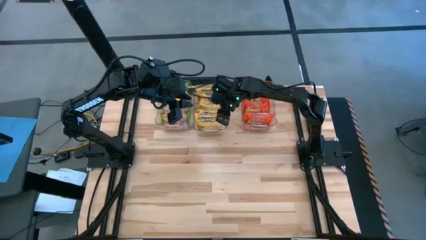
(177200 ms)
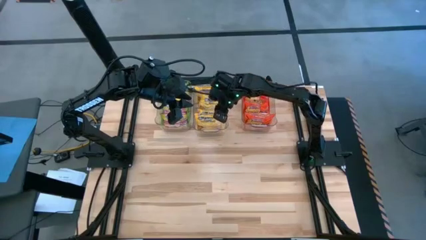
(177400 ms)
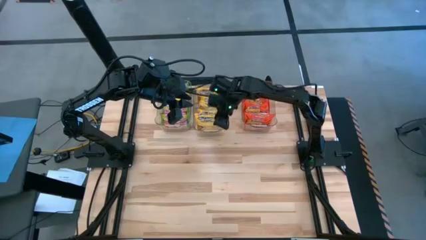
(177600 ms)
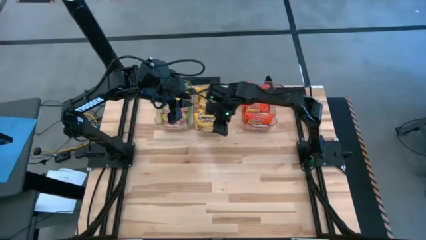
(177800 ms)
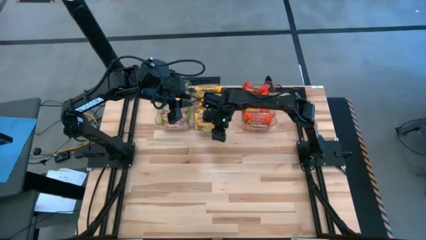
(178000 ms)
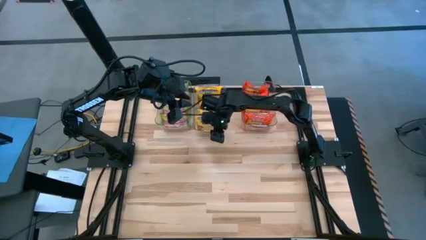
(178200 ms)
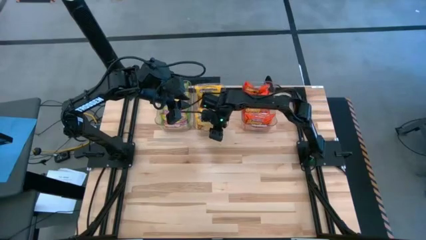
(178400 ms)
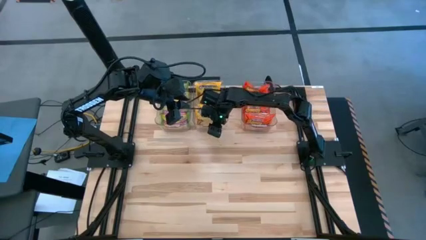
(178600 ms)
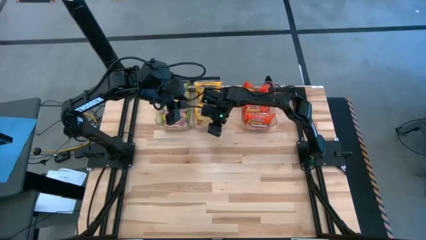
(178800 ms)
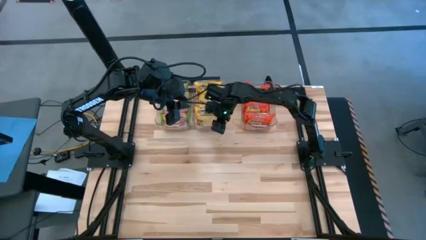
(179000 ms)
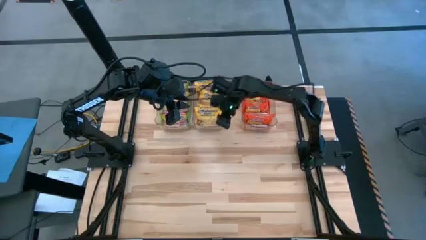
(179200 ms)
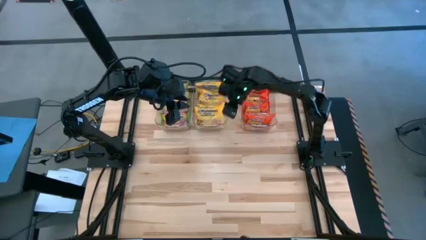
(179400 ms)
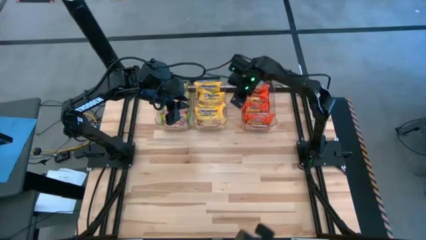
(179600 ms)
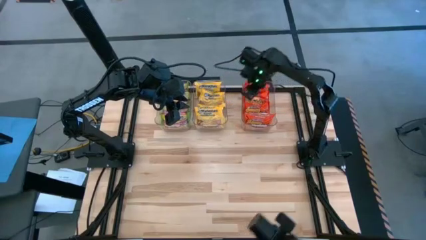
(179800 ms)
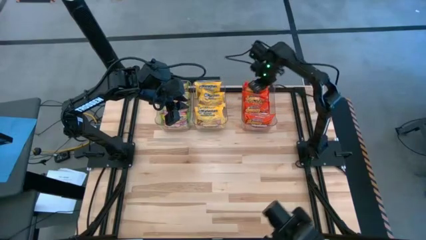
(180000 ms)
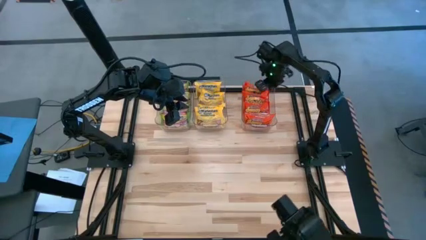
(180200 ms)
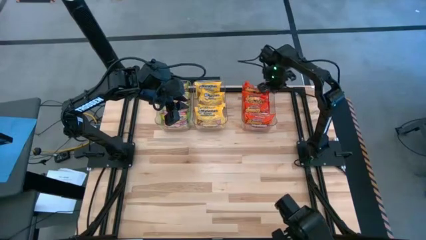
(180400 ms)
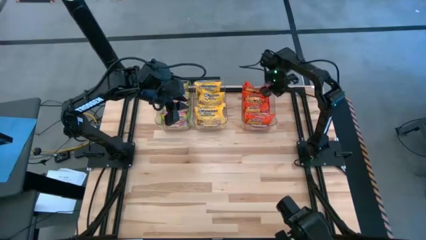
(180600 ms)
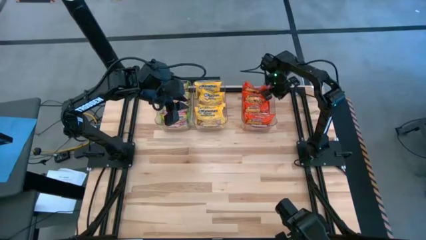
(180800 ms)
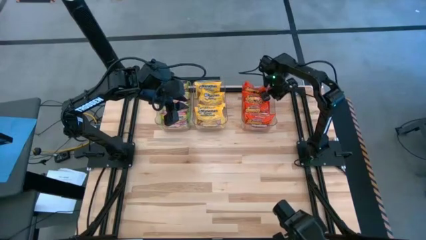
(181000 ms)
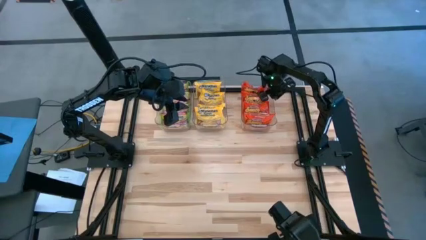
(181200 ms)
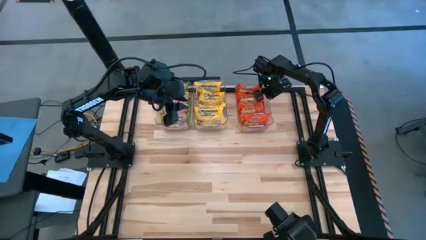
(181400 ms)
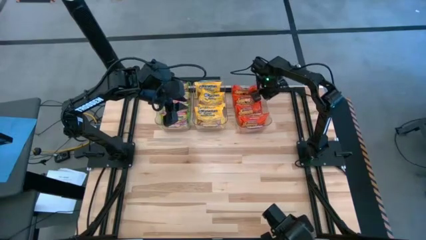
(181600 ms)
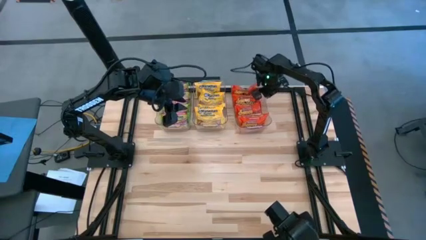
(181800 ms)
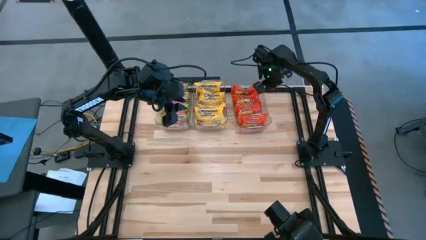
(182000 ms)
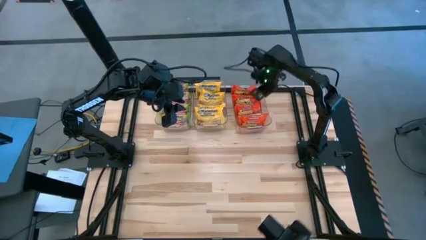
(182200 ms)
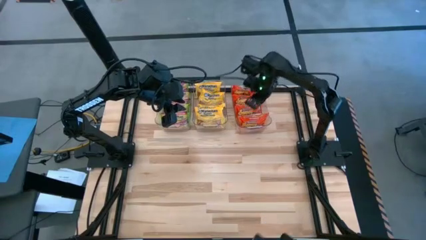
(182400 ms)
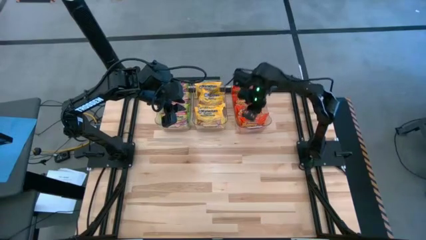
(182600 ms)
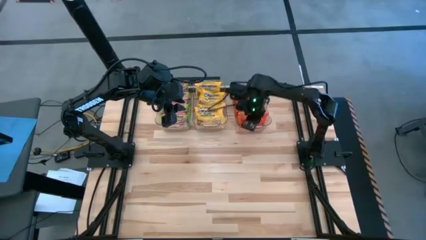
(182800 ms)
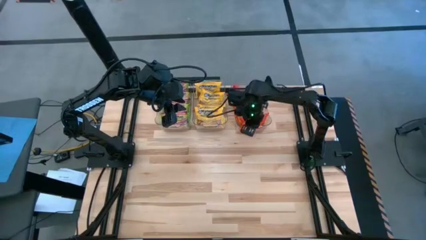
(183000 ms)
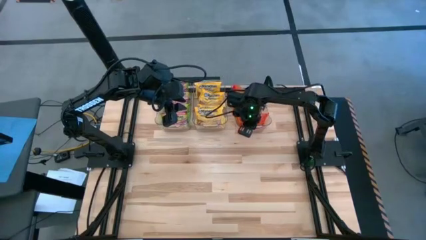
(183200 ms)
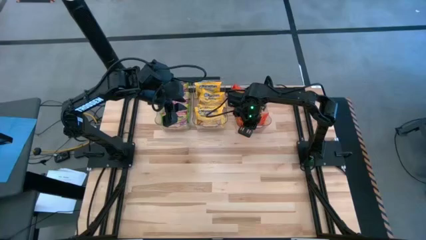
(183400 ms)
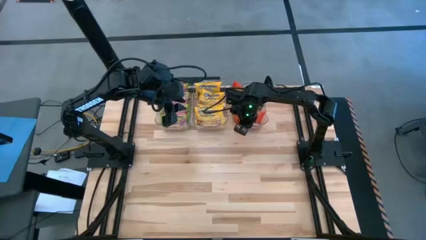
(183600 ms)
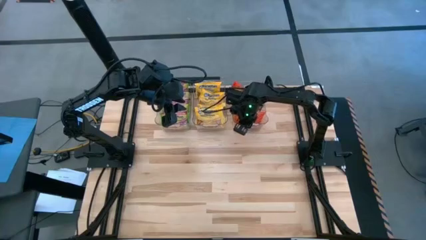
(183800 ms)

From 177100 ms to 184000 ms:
Task: Sort Maruchan noodles
Adjust the transparent bins

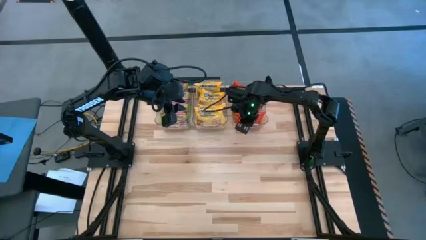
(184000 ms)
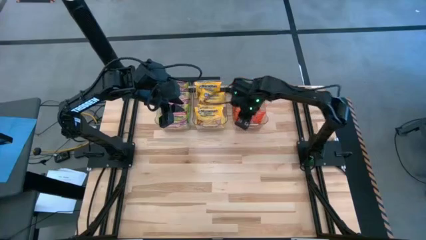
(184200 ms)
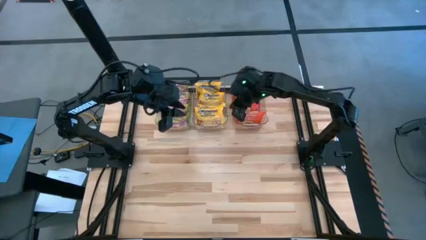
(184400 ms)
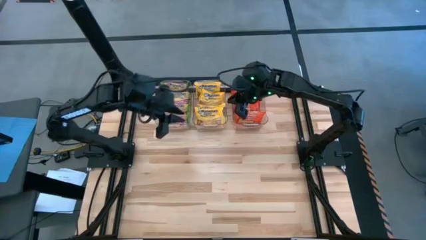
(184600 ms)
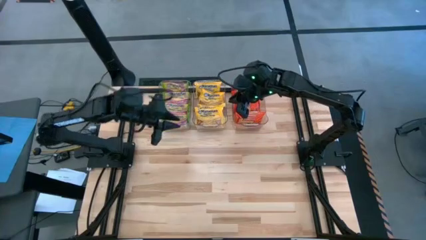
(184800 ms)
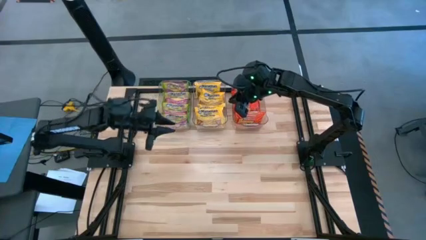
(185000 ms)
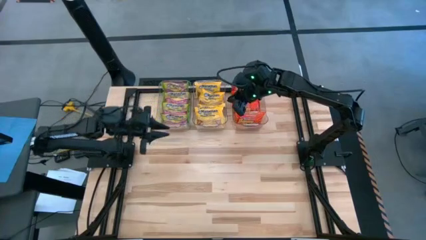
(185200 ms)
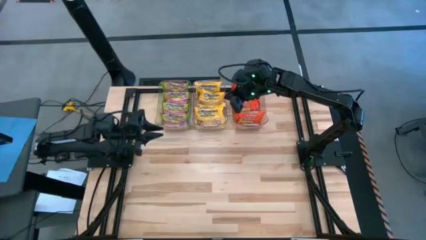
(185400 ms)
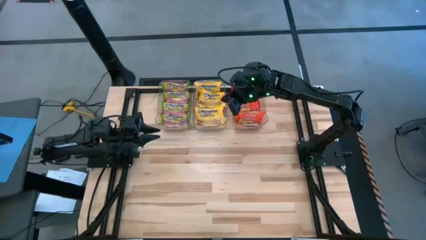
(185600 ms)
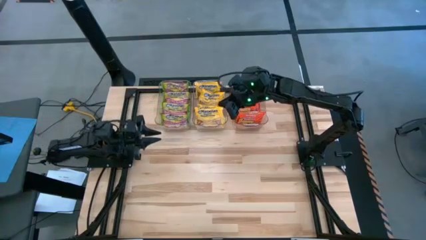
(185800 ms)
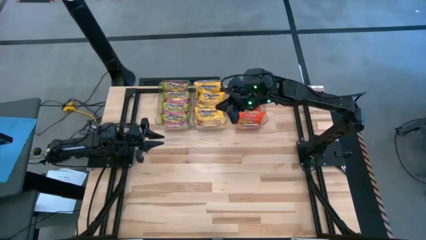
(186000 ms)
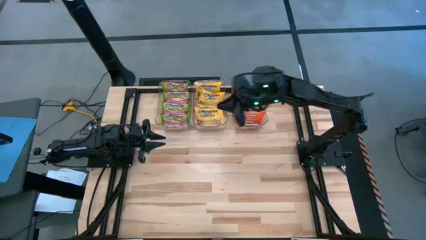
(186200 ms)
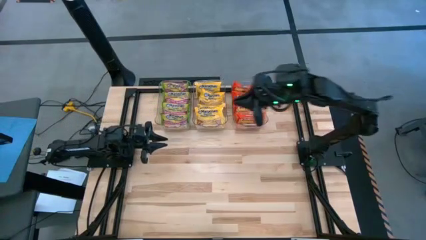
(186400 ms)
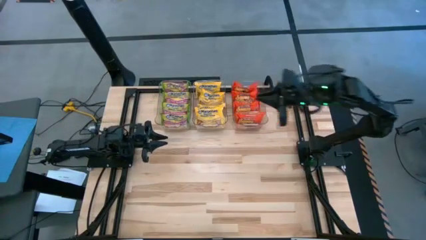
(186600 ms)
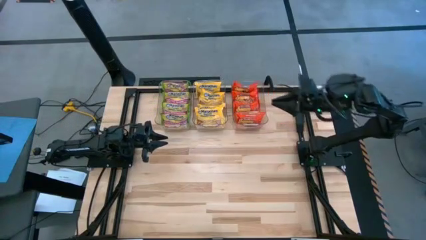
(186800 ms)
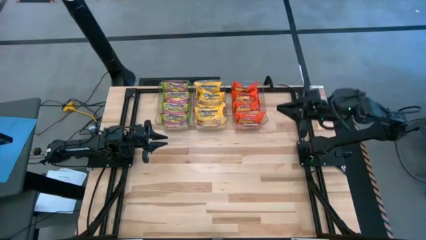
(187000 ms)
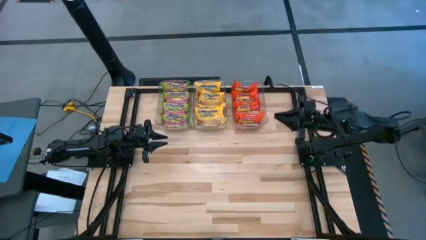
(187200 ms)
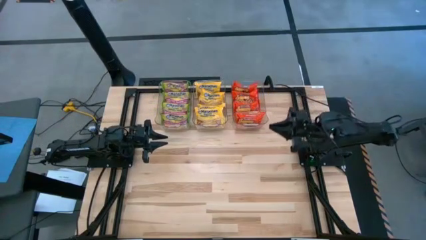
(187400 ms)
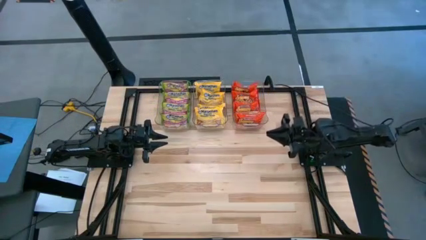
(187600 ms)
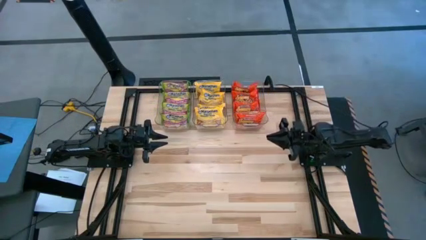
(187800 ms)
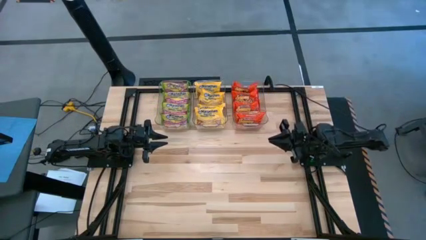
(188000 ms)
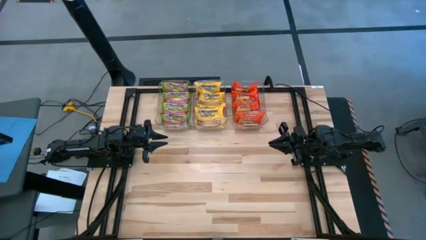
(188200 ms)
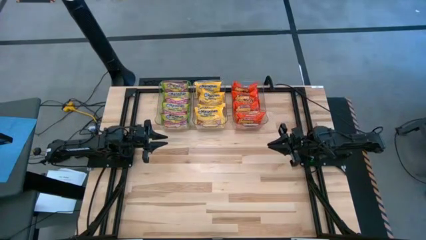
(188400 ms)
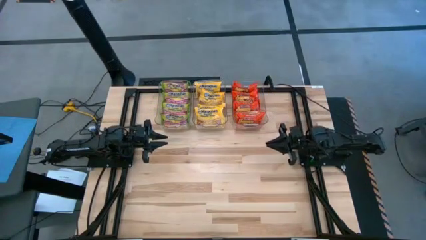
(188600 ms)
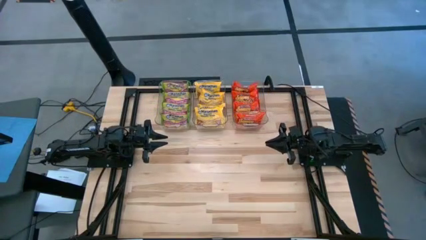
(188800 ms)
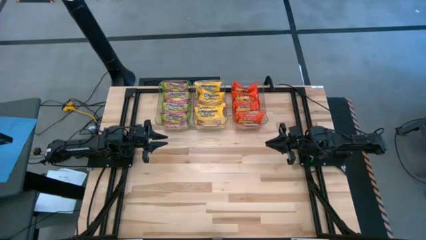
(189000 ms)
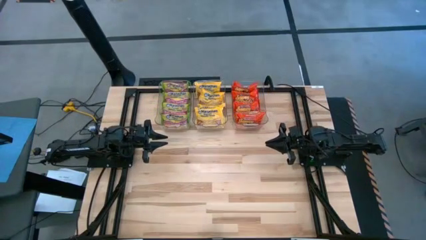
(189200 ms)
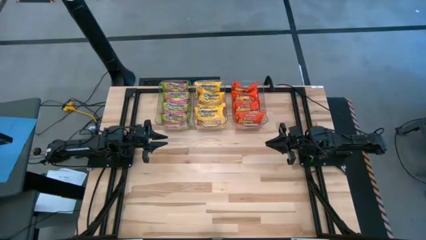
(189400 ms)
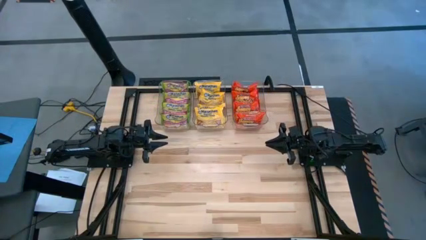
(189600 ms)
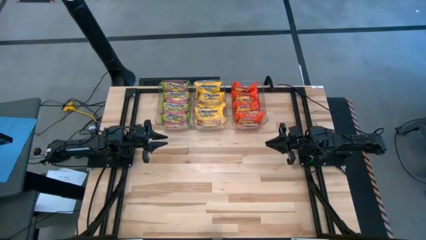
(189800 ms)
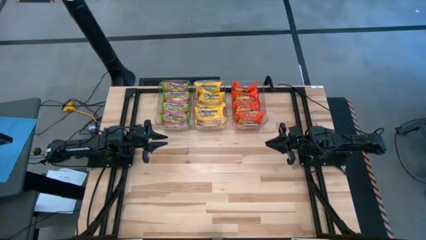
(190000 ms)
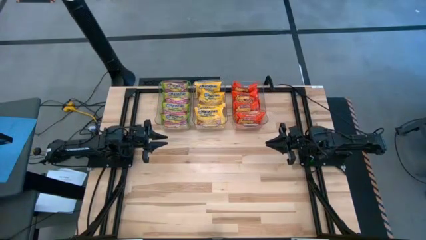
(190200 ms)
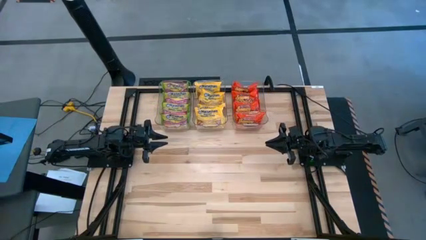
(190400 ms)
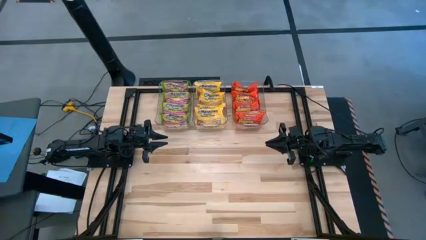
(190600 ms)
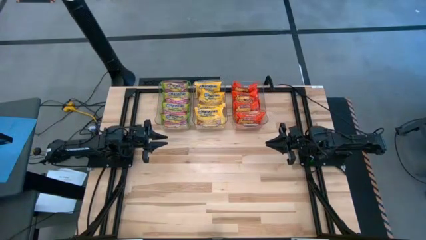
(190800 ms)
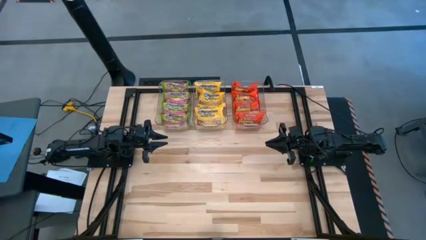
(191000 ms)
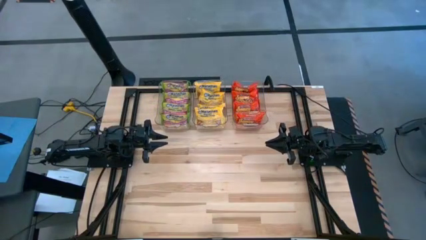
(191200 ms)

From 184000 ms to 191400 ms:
Return to Home Position
